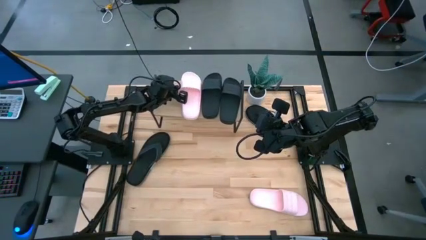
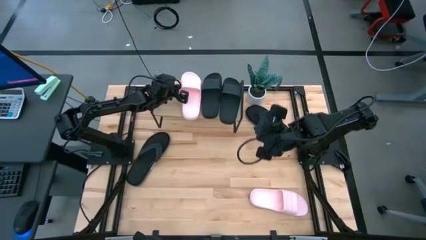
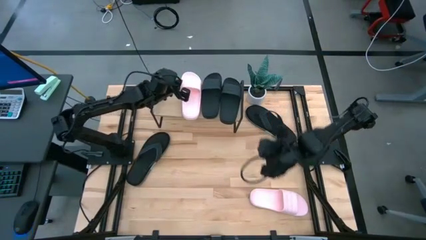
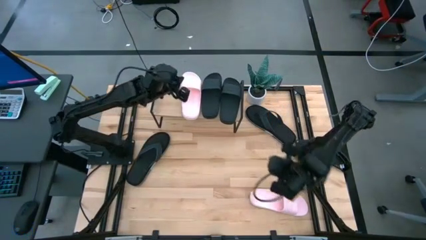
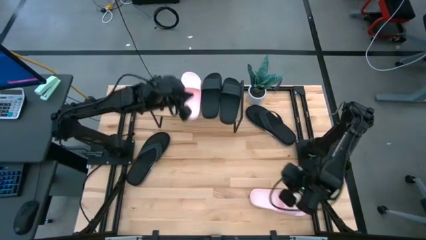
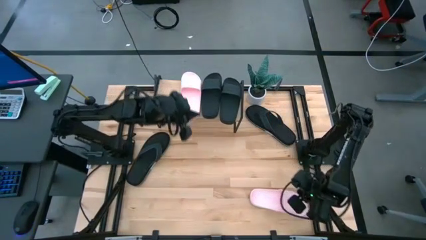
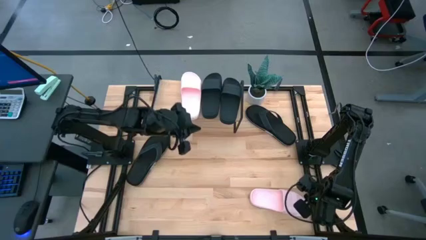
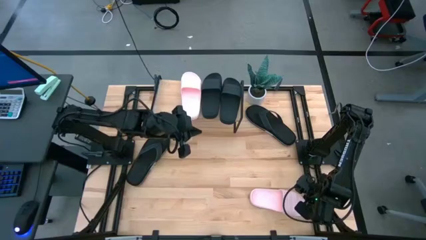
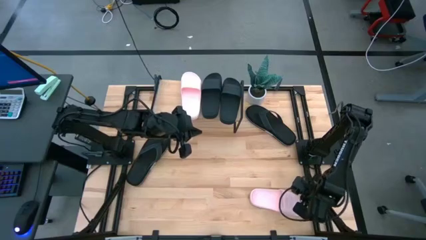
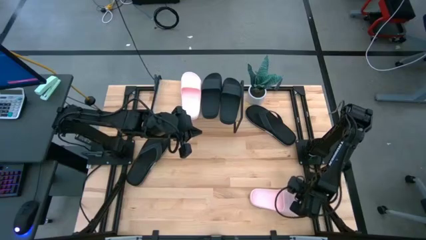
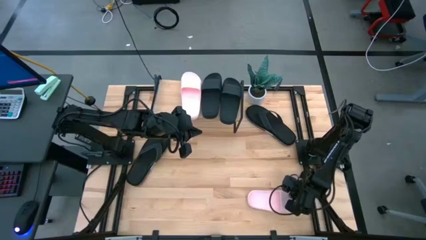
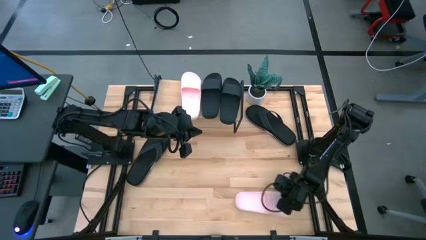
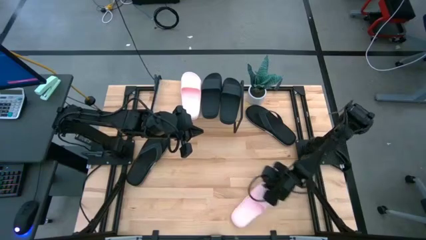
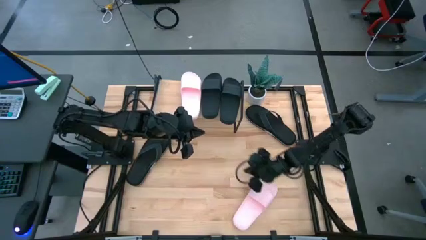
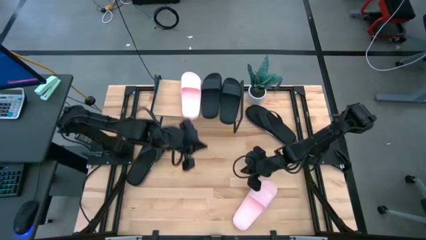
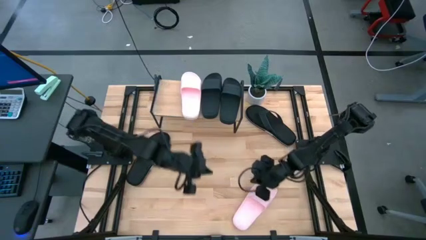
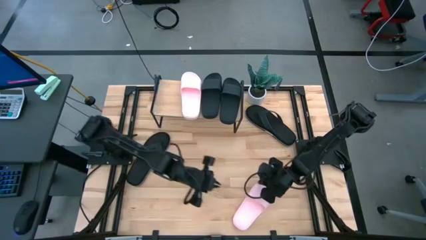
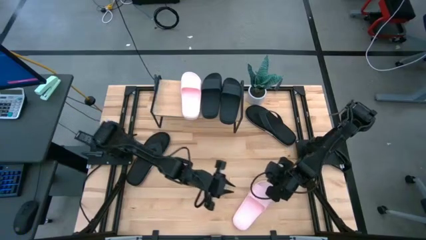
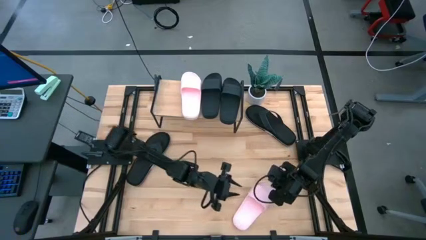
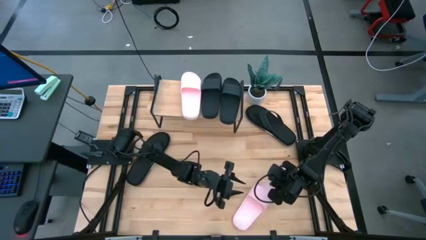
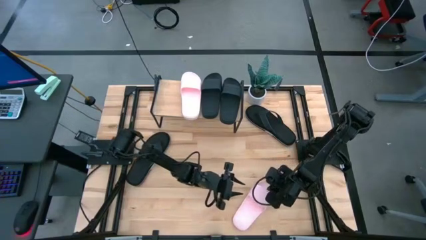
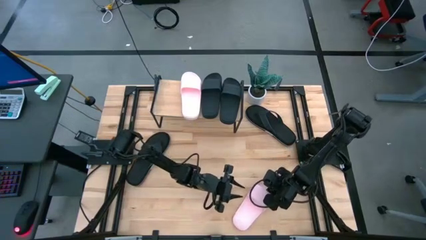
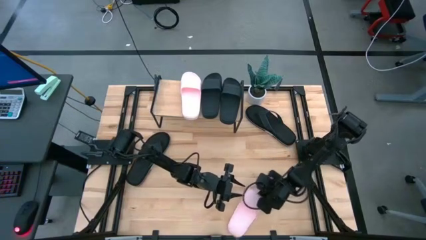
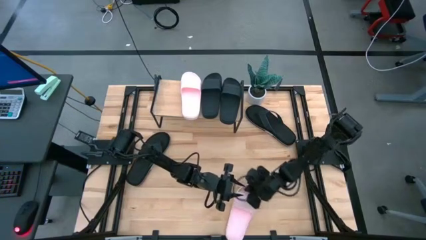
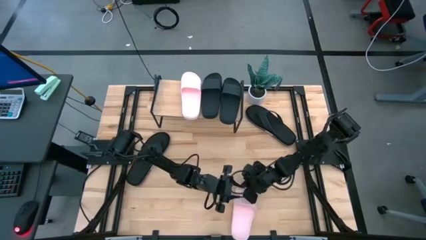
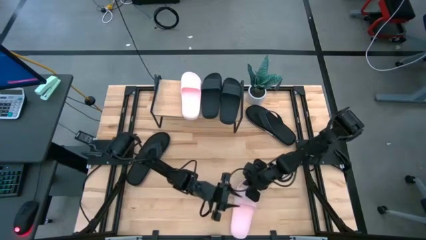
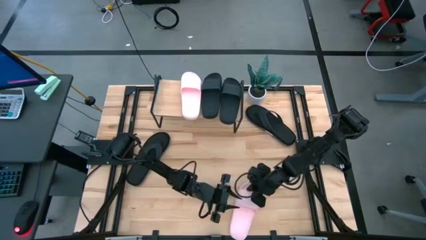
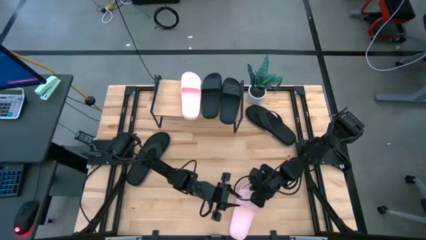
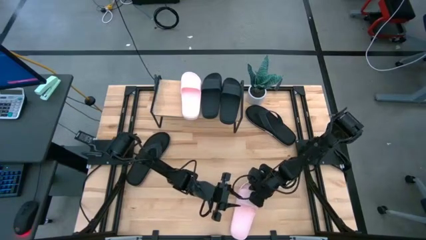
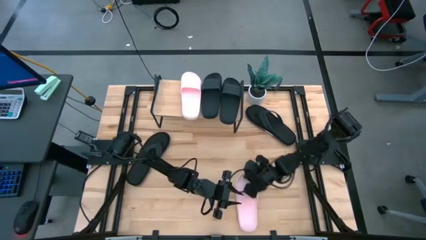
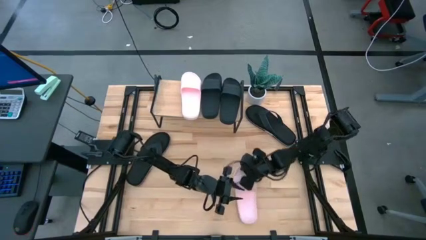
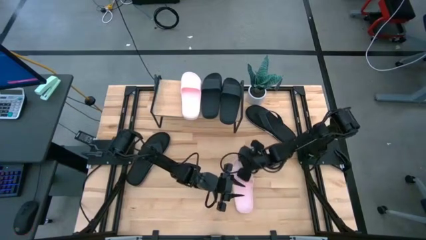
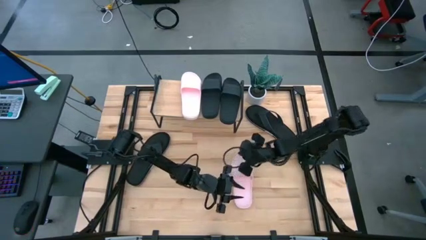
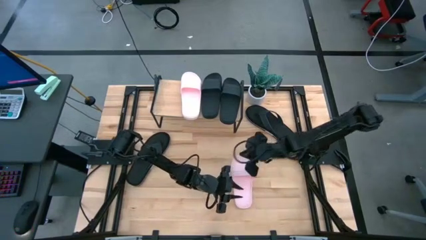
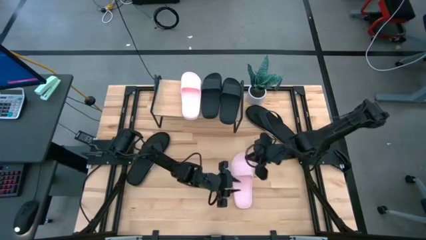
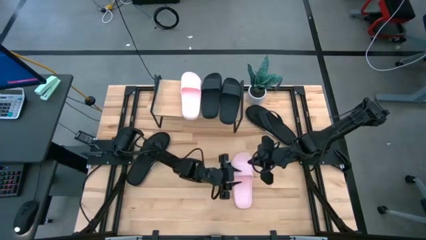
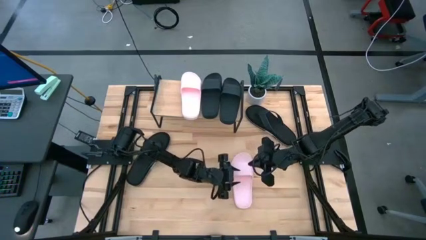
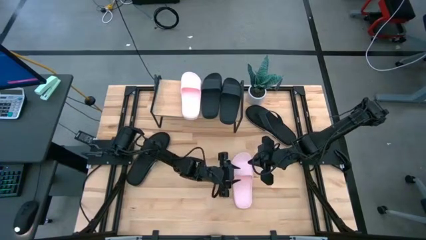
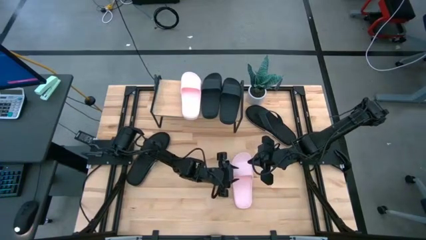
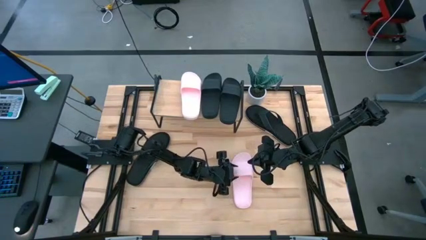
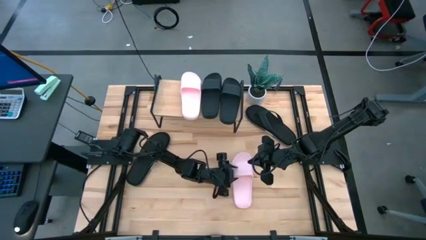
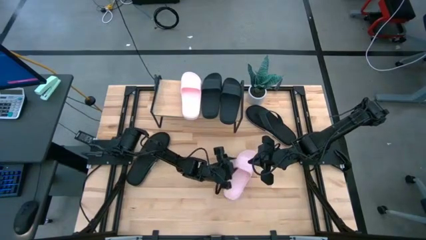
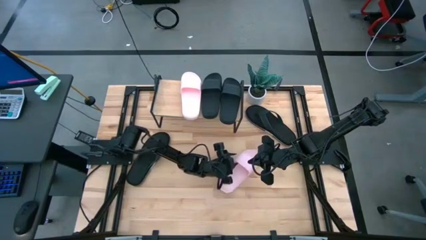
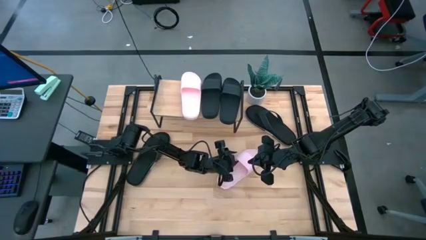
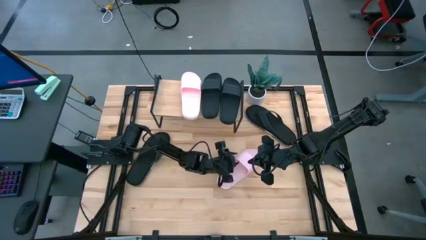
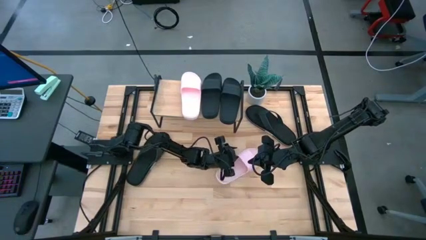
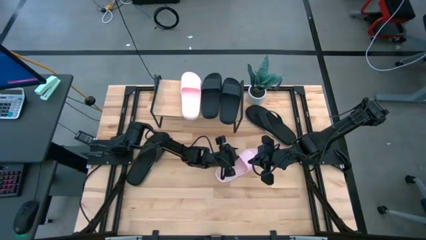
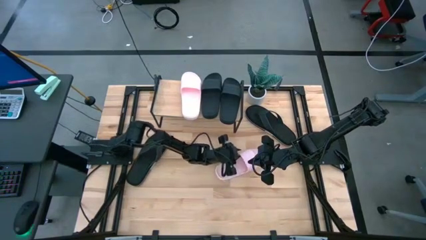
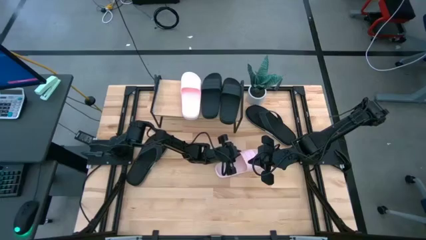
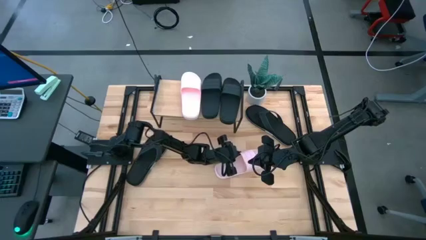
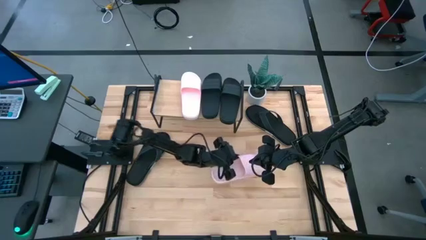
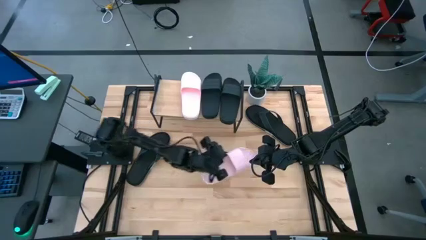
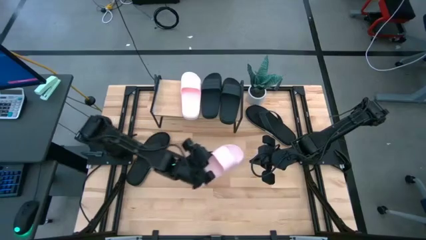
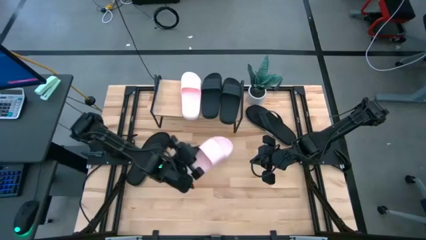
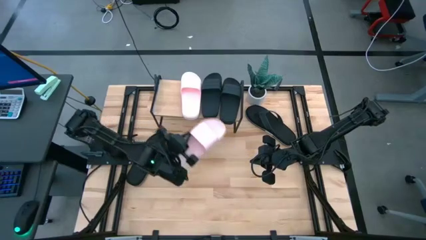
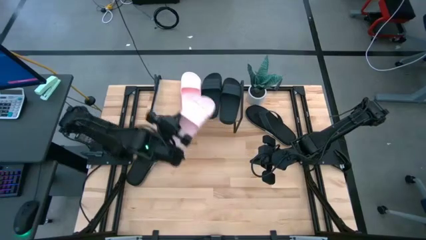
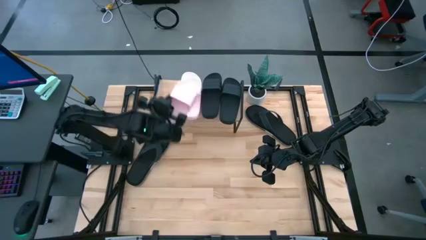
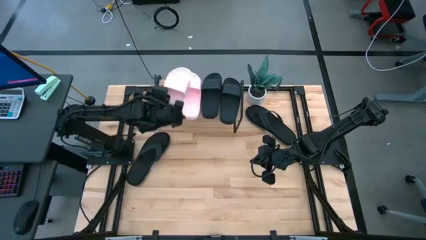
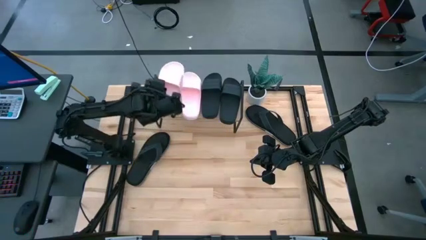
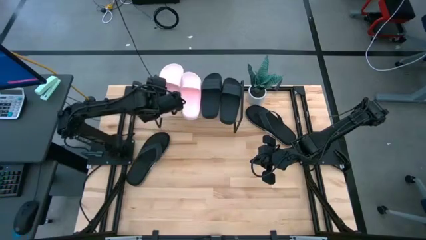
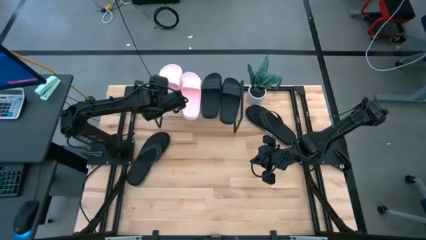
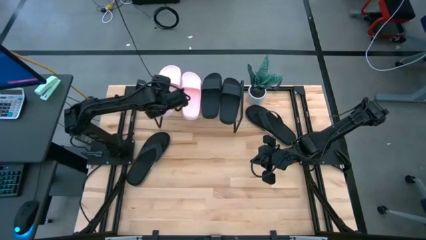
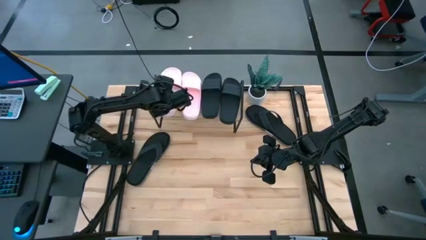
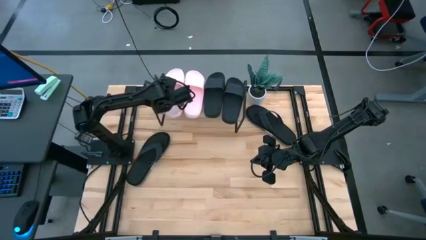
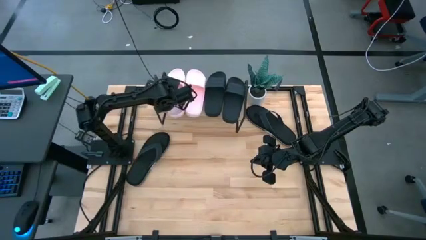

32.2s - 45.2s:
Task: Pick and place slides into the shelf
Put the pink slide on the shelf

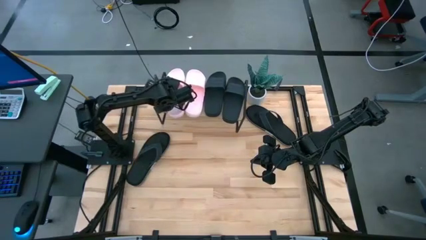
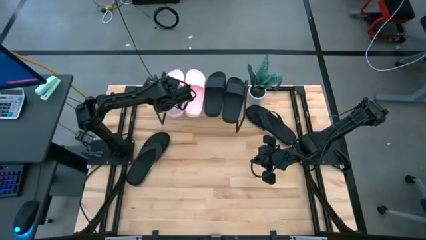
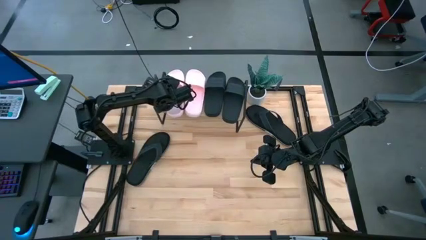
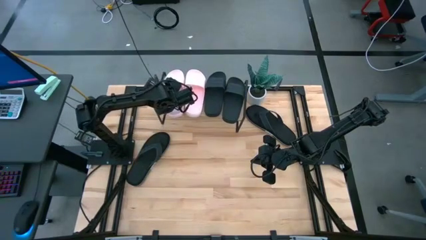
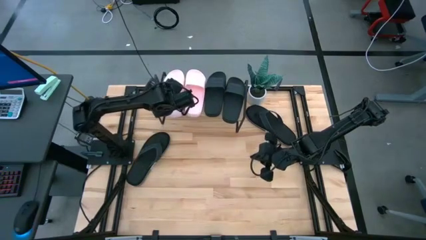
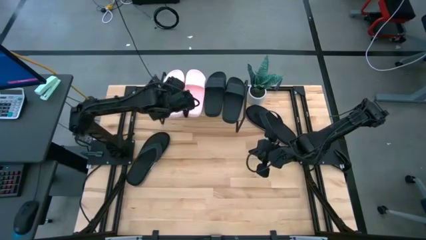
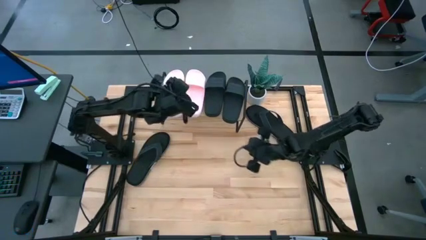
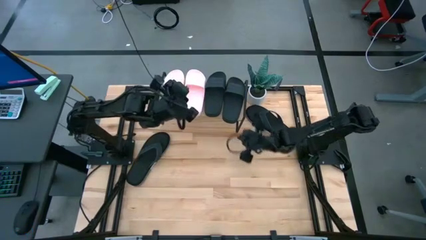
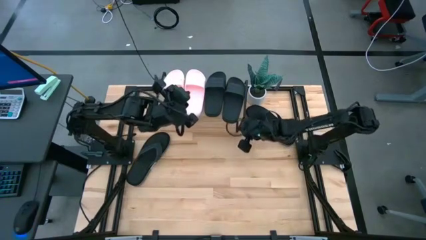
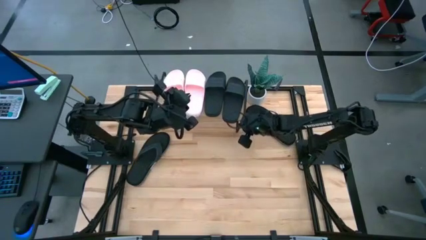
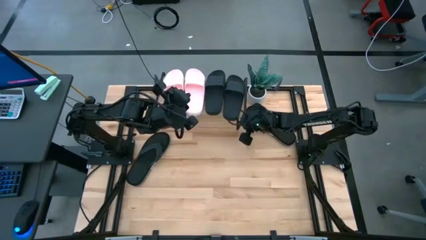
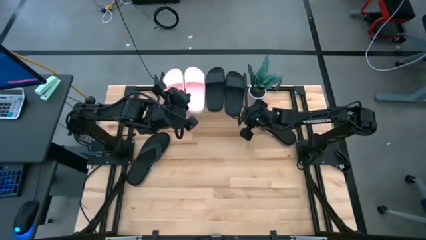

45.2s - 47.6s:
Adjust the shelf
